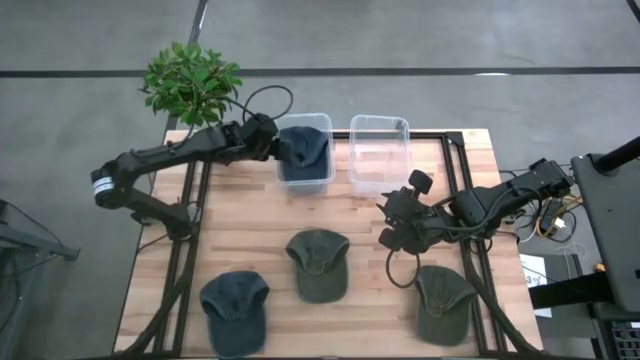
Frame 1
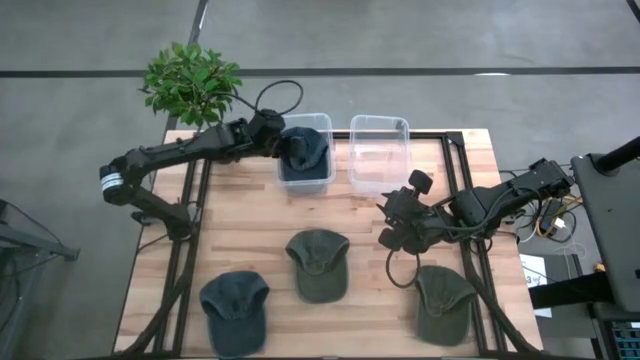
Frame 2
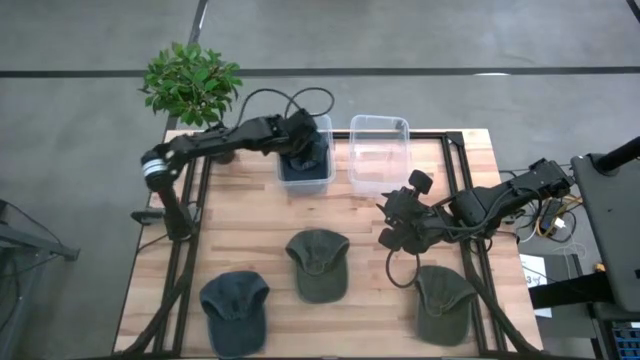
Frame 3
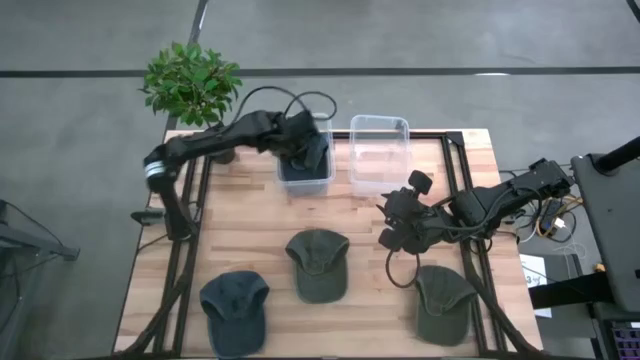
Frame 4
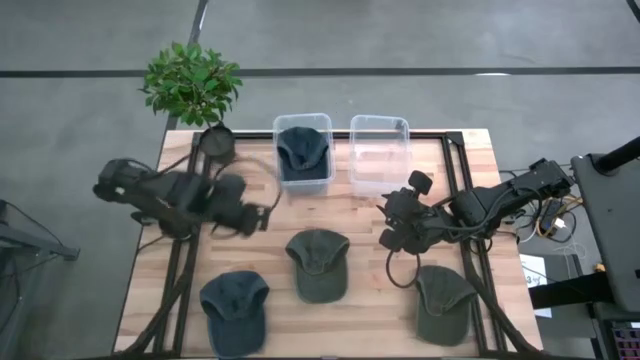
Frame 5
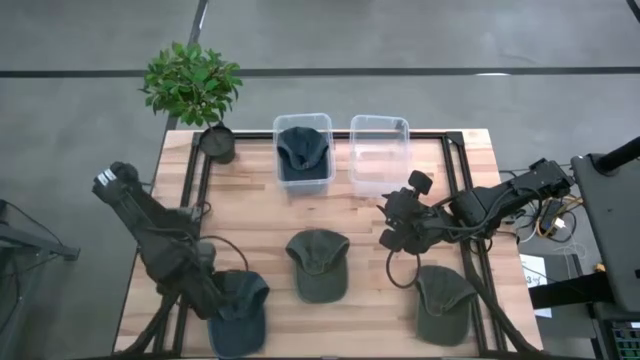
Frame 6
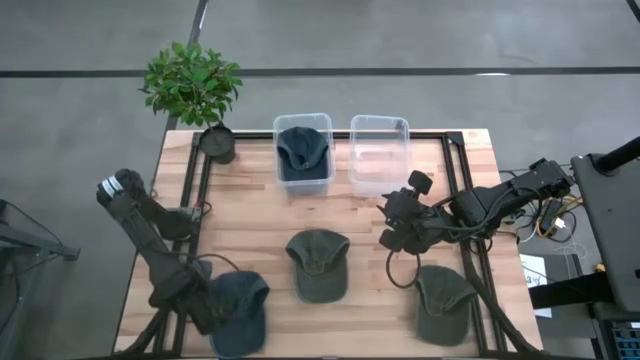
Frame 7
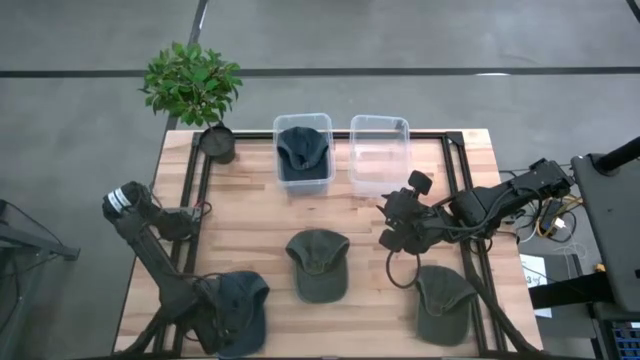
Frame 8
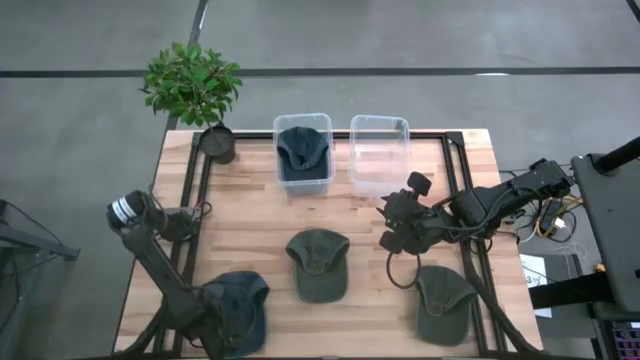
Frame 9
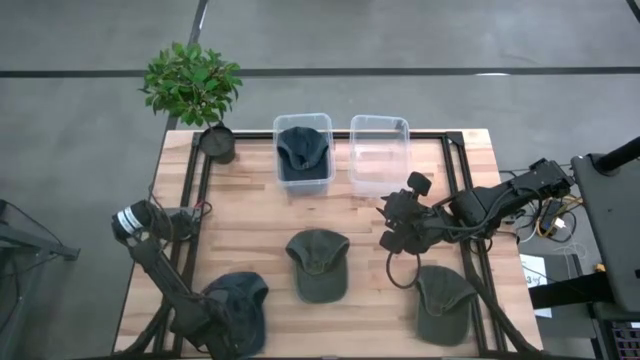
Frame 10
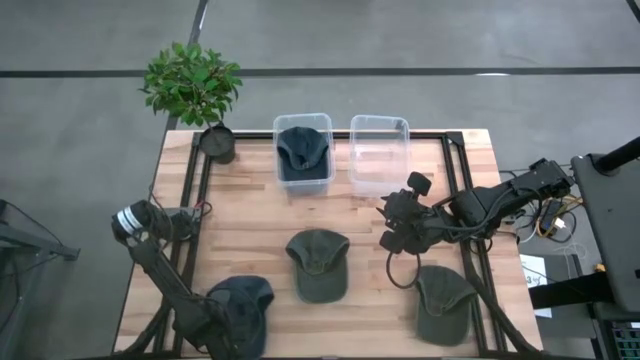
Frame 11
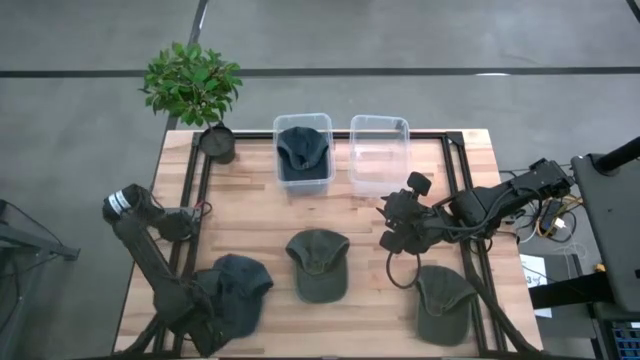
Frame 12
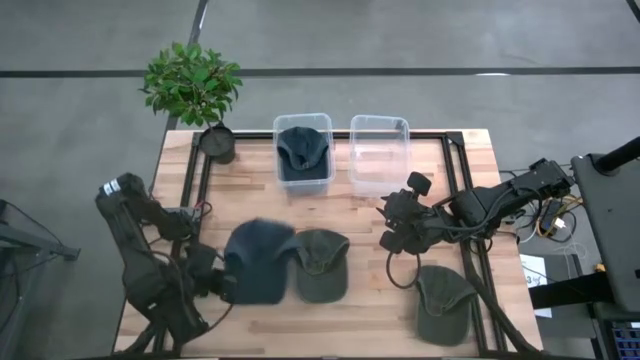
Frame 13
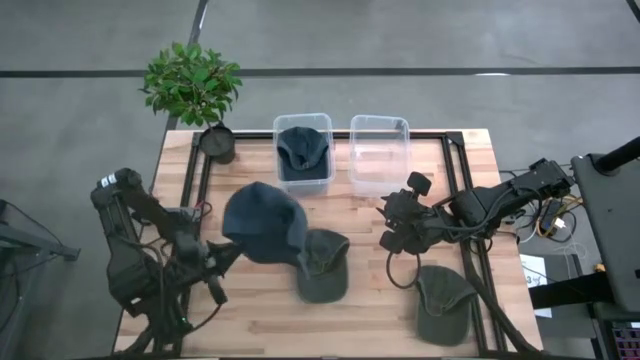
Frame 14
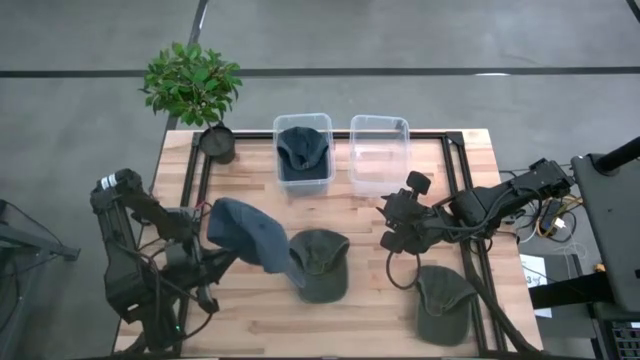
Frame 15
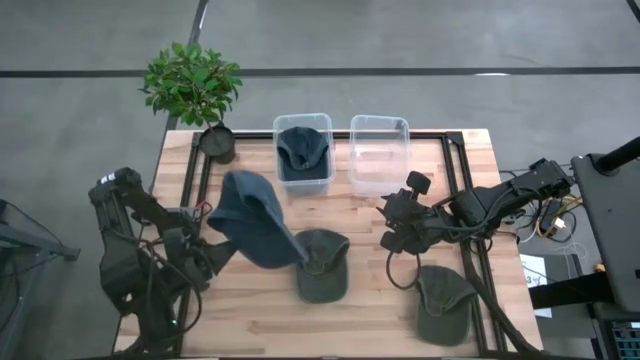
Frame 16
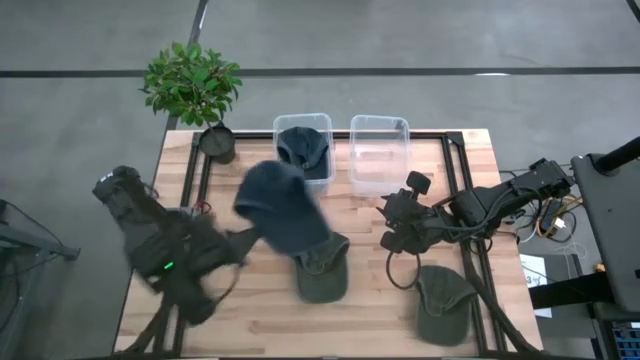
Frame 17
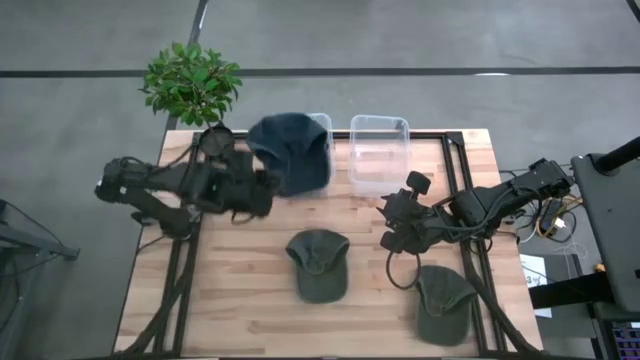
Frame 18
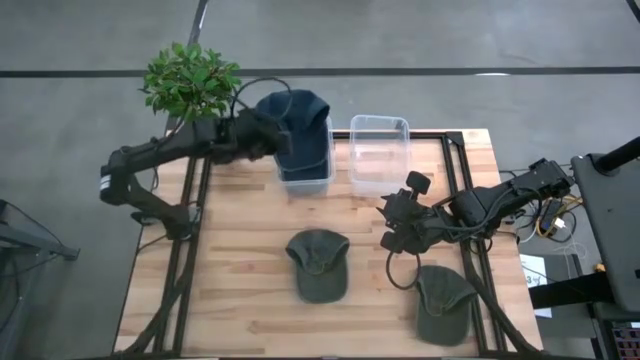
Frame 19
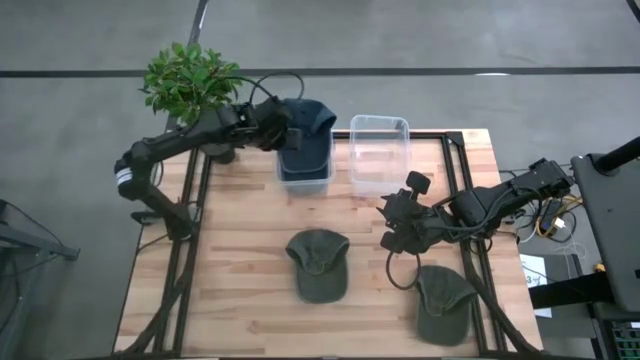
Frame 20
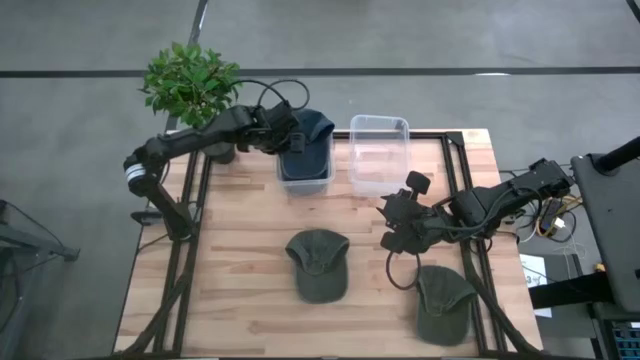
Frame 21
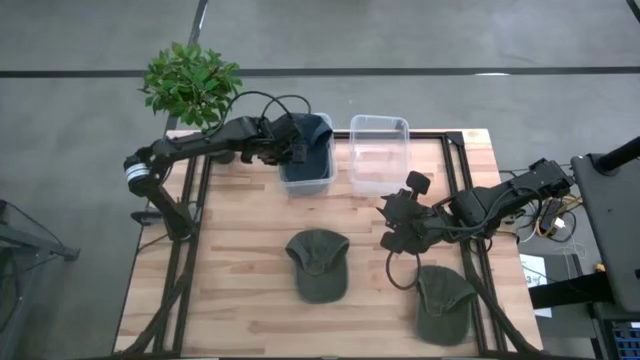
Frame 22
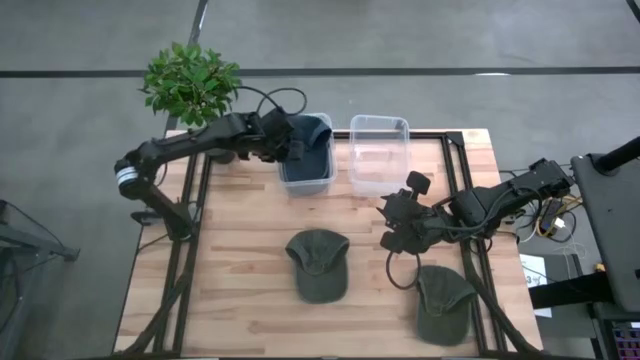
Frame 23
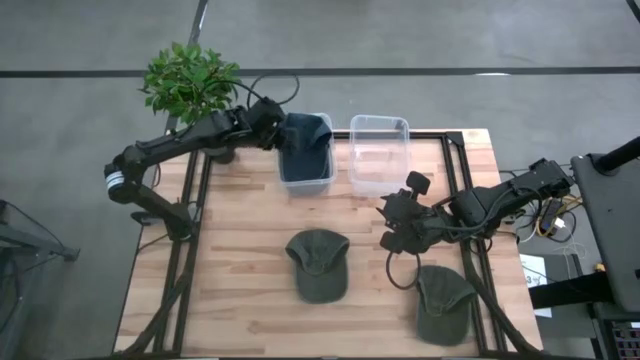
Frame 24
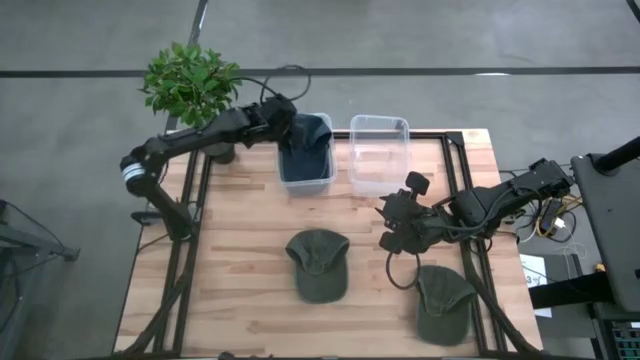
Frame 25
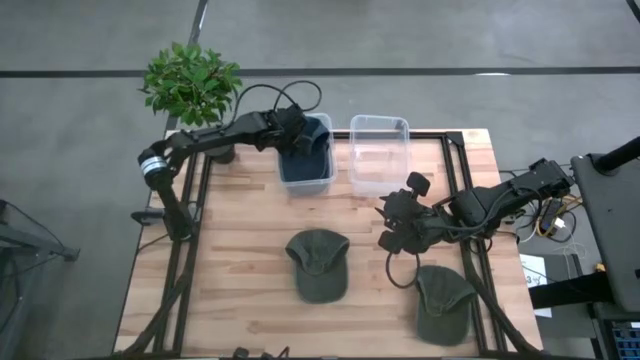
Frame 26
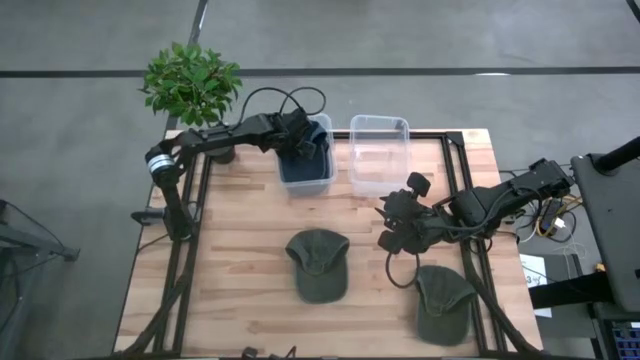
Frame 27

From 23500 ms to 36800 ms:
Task: Pick & Place hat
Put the blue cap into the left transparent bin

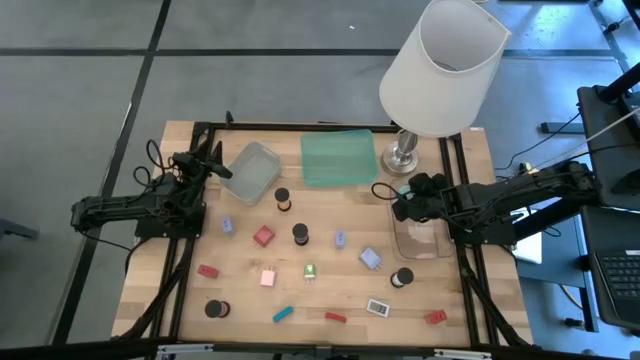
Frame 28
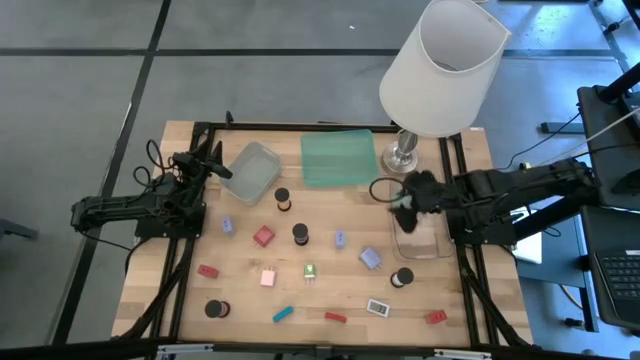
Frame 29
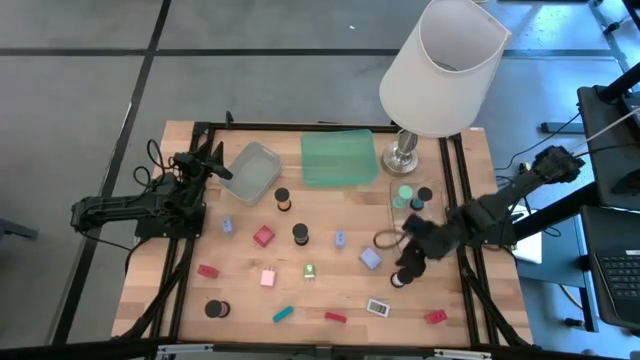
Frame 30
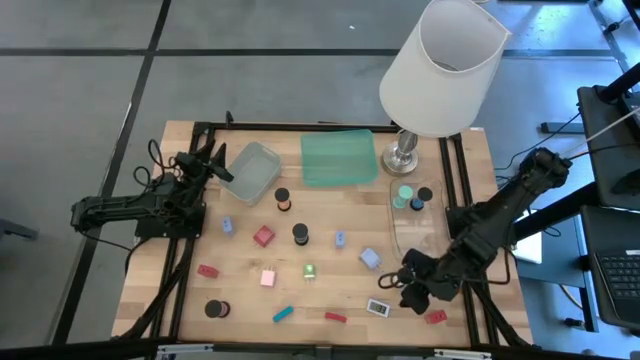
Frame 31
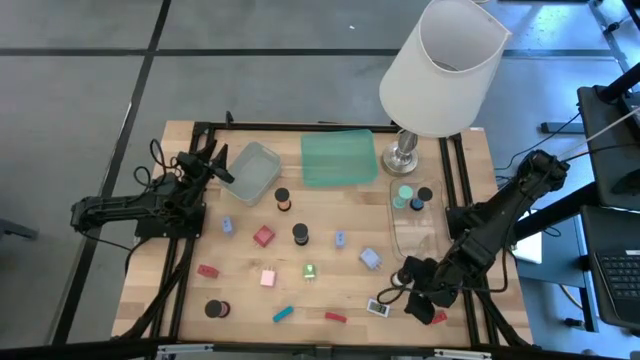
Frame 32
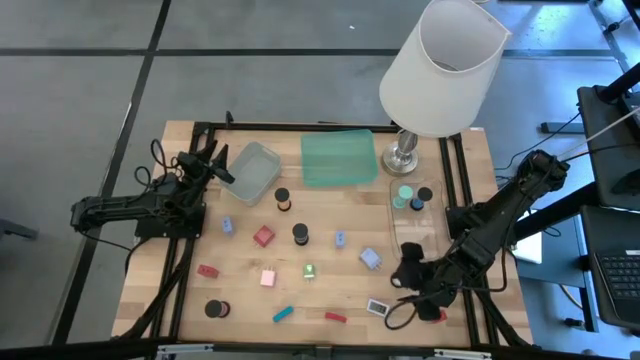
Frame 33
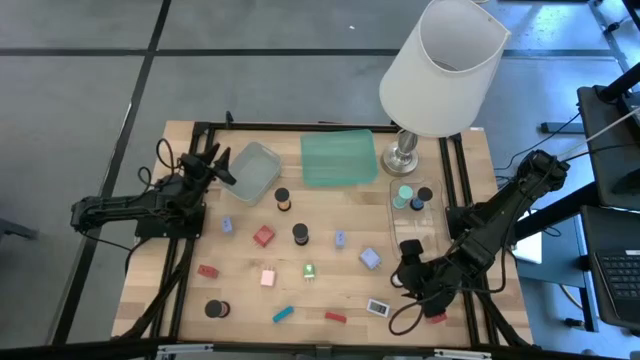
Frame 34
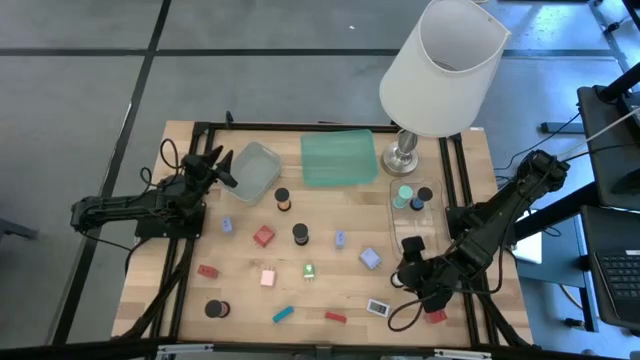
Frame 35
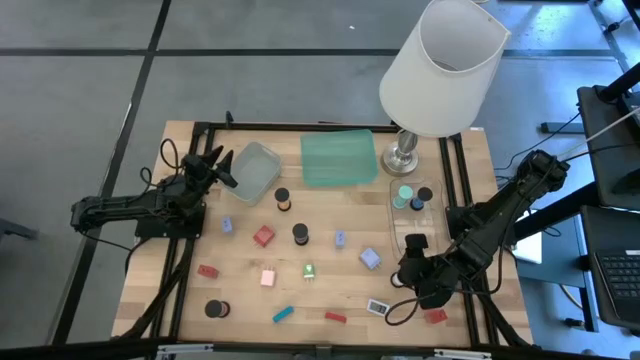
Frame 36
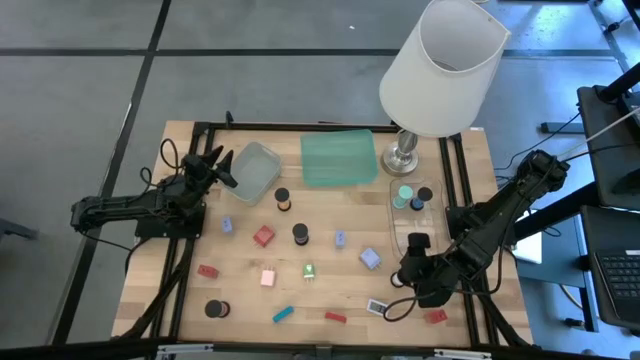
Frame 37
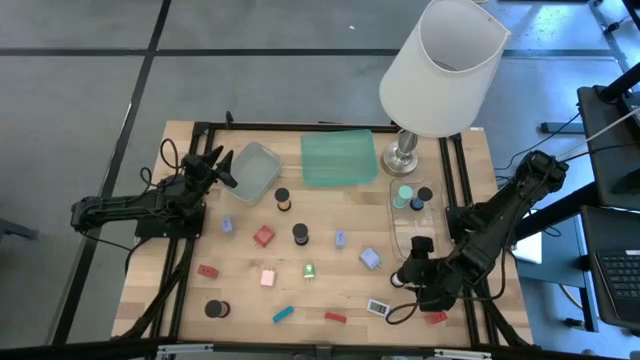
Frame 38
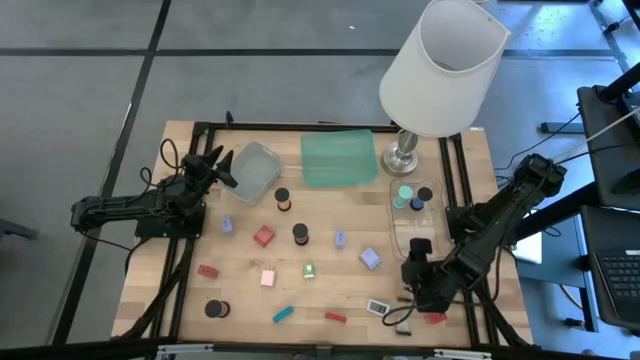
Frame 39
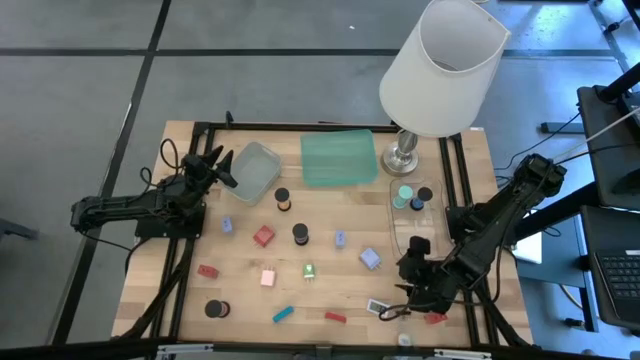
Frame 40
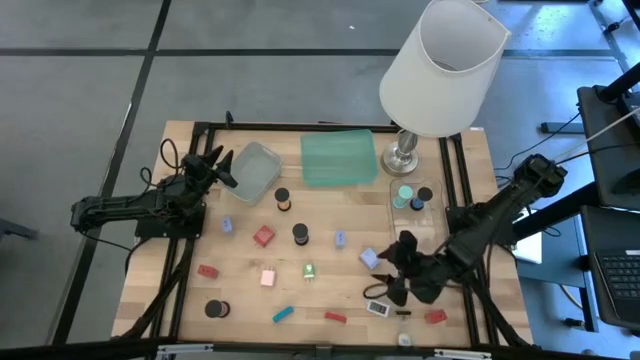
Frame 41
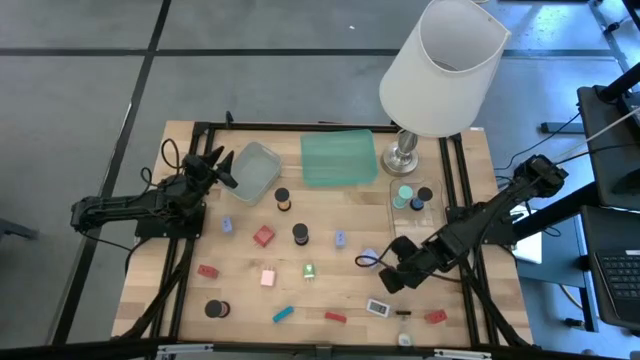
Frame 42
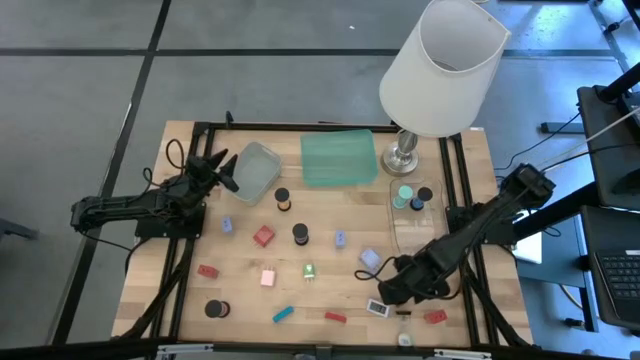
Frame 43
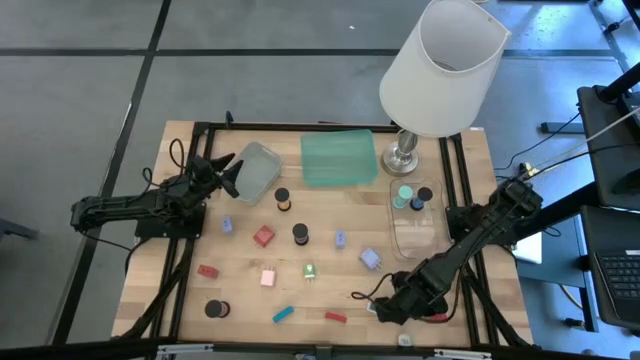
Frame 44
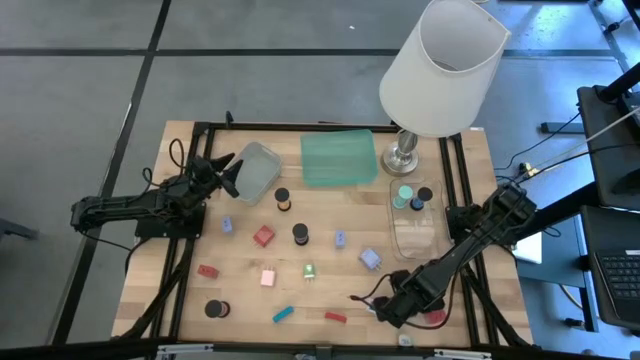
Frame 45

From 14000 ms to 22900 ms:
Task: Pick & Place Office items
Put the white hourglass into the transparent bin
